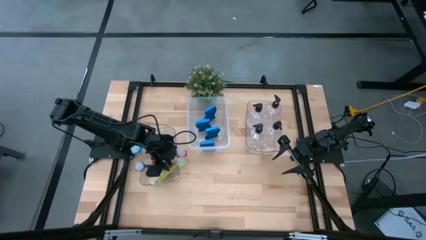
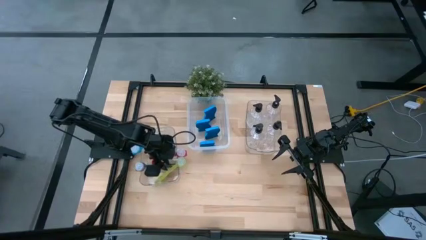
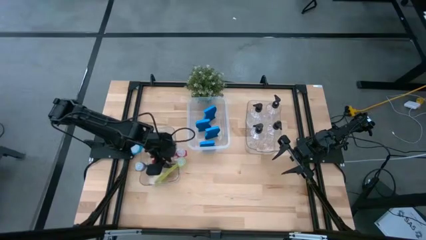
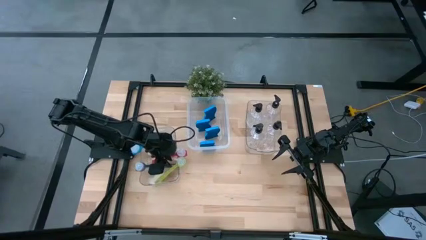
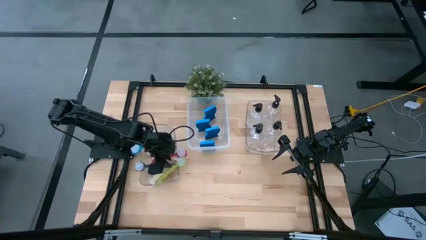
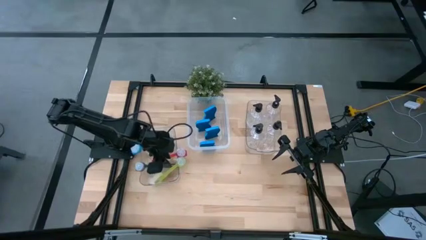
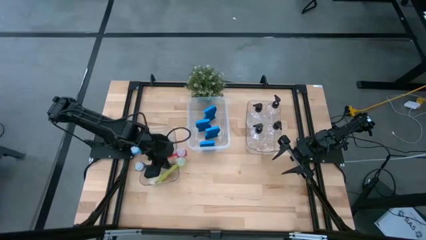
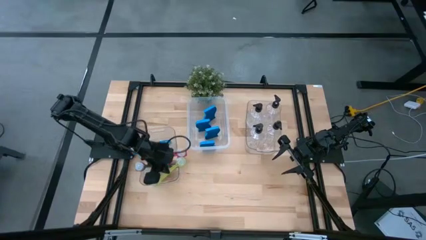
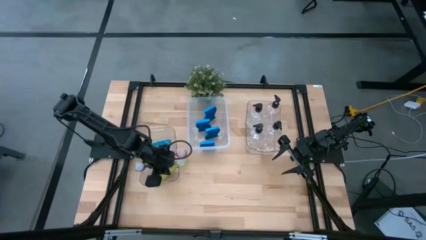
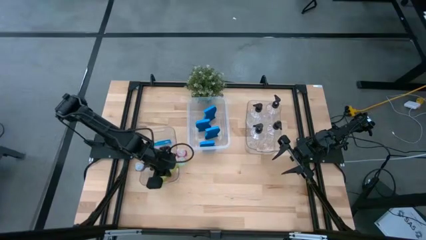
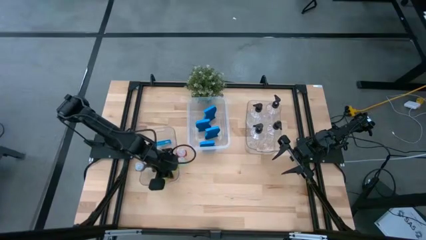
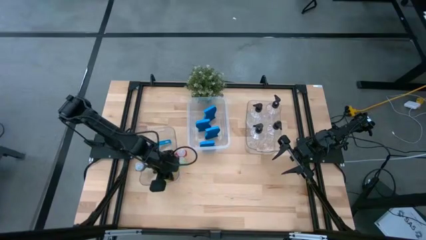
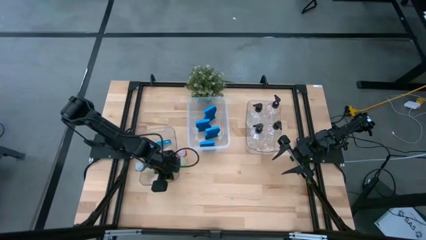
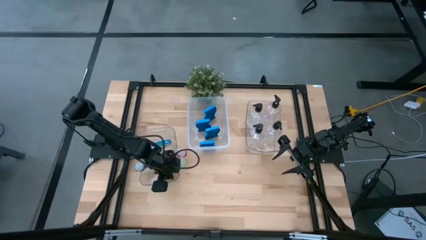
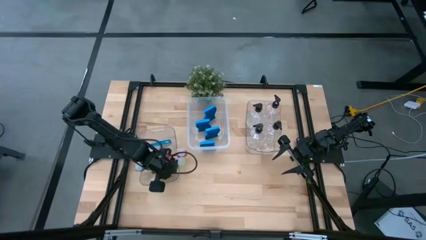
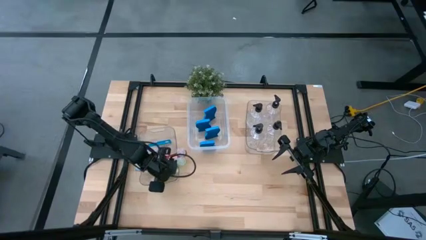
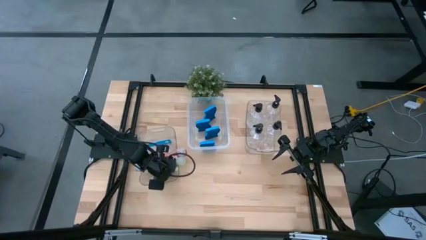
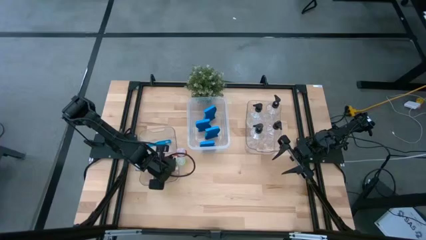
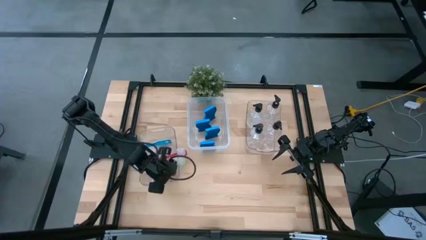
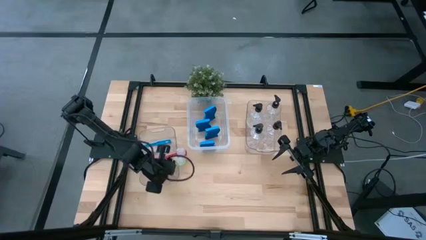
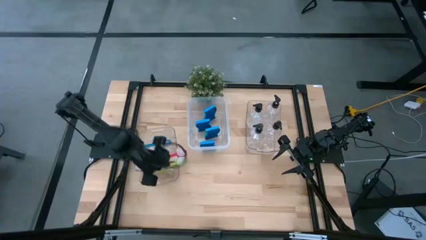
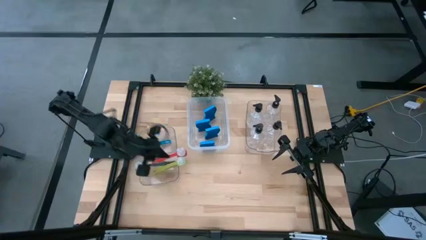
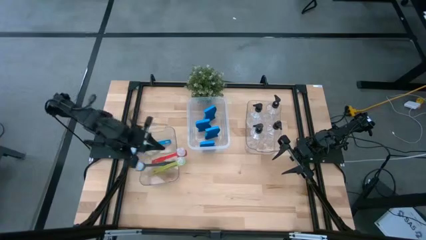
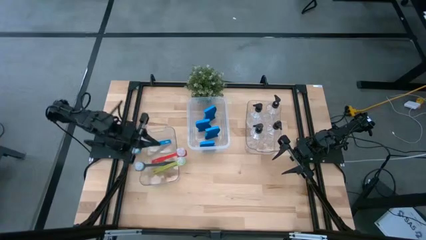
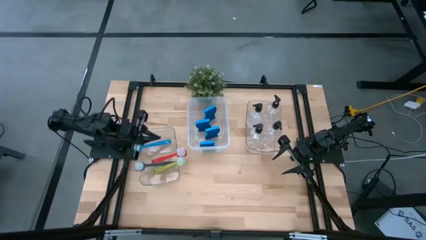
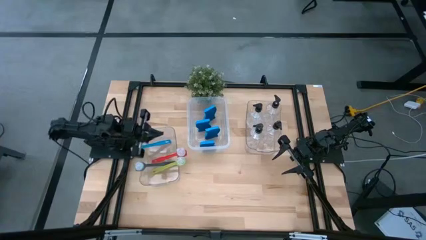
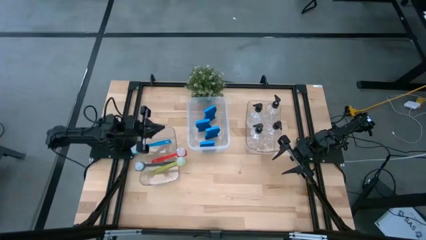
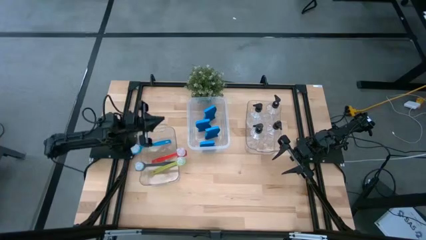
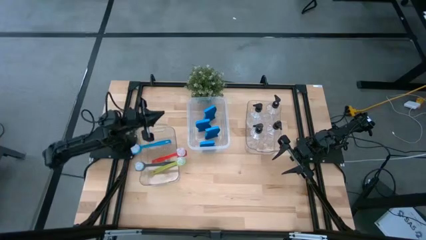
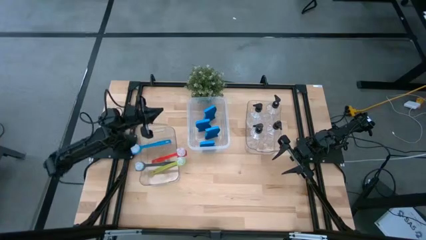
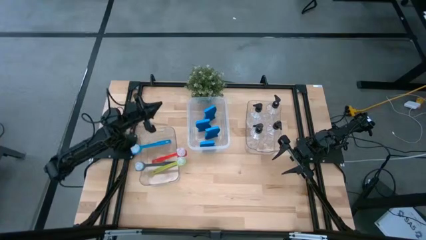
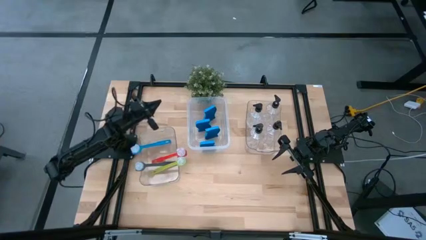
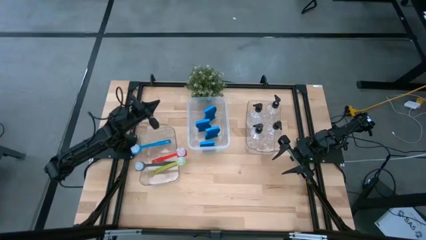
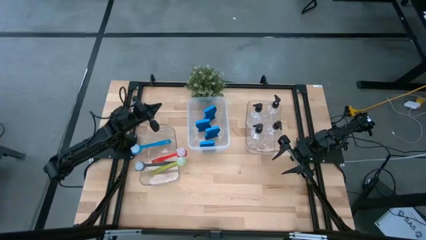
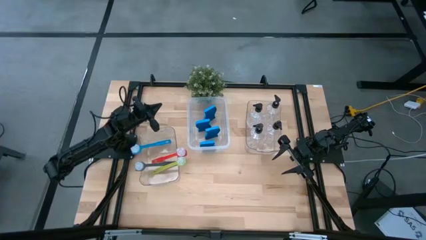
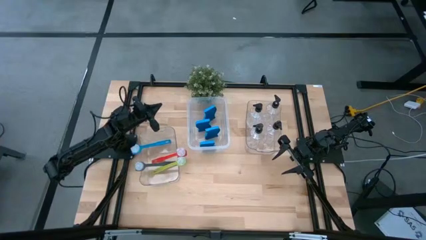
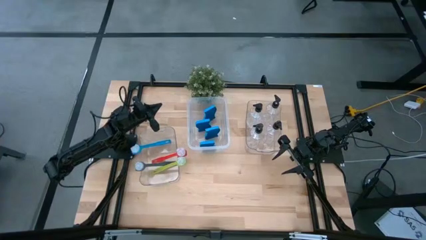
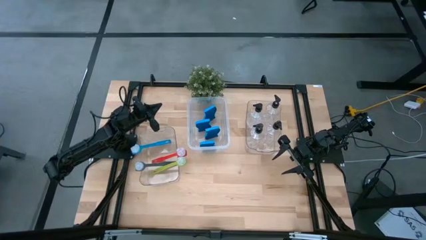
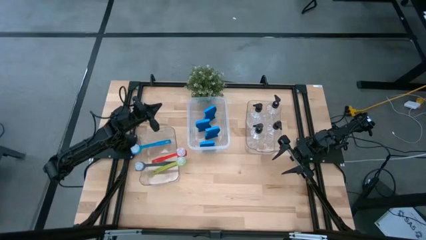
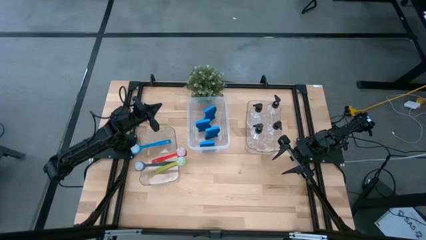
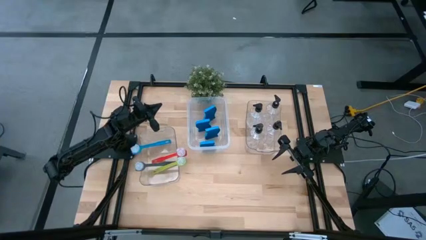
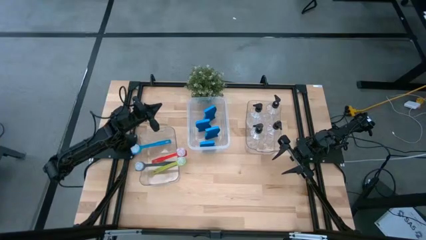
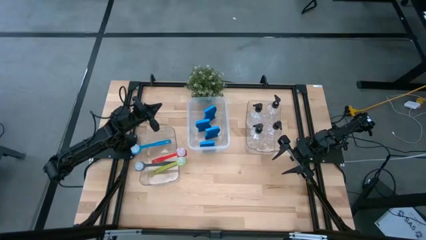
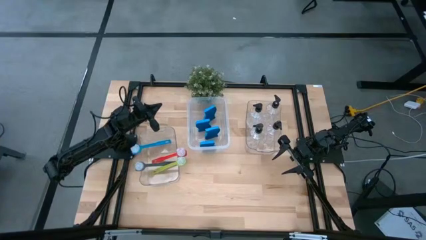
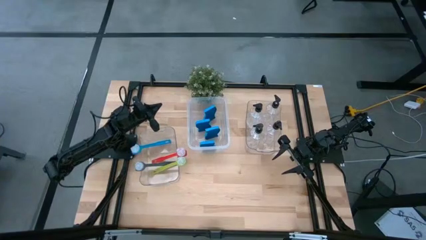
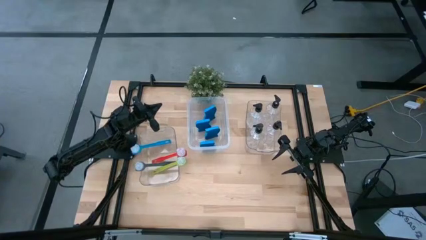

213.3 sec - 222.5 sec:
Task: Pick & Place Kitchen Sink Supplies
Return to Home Position

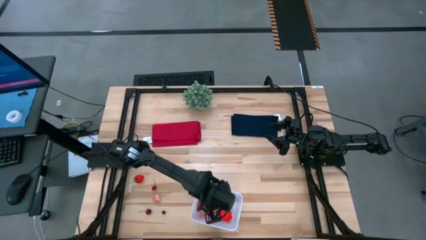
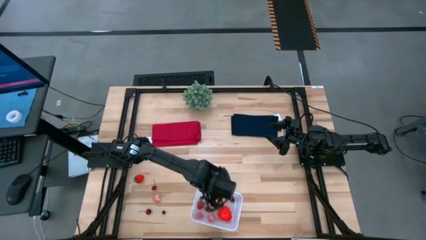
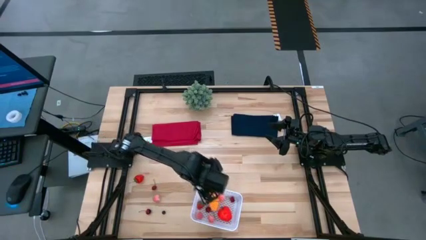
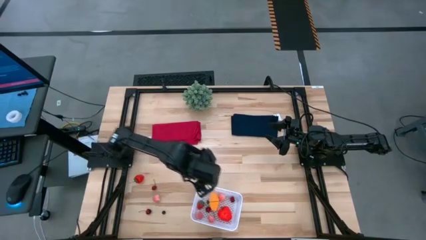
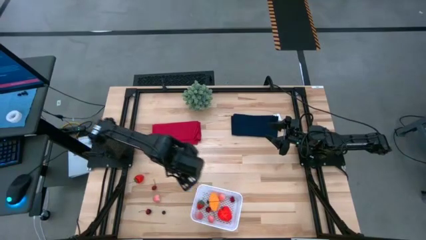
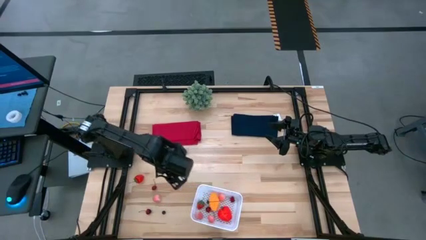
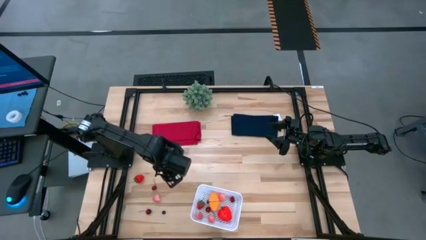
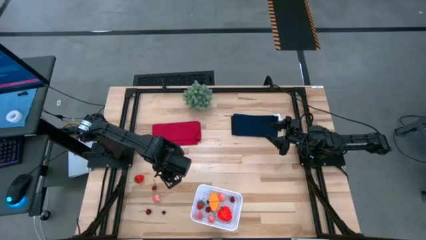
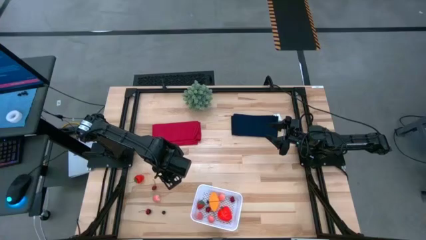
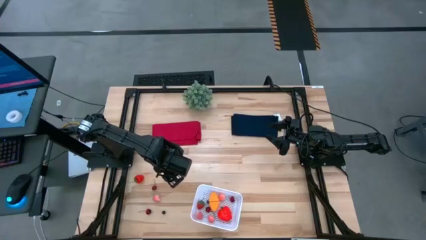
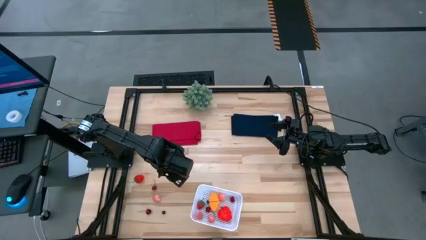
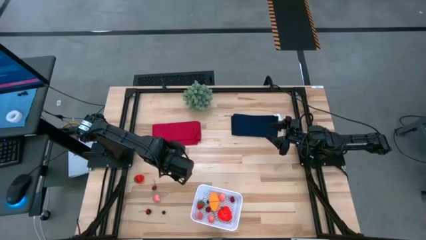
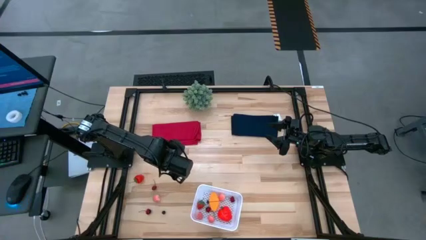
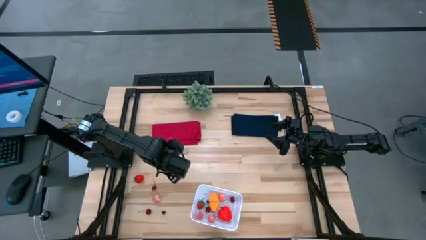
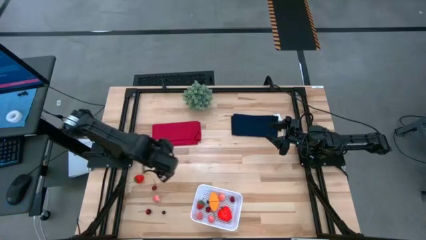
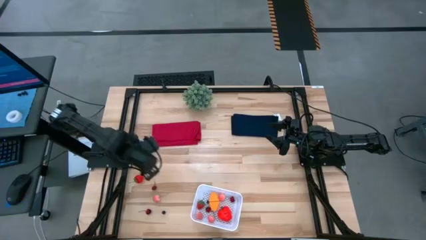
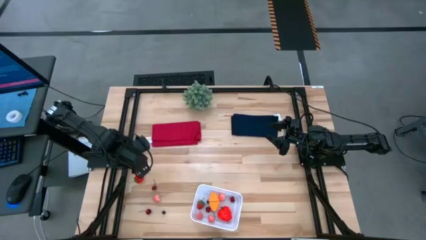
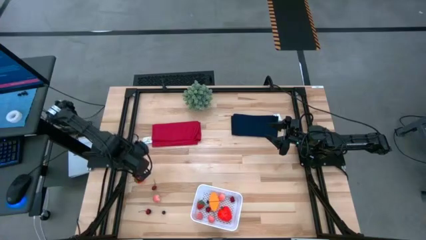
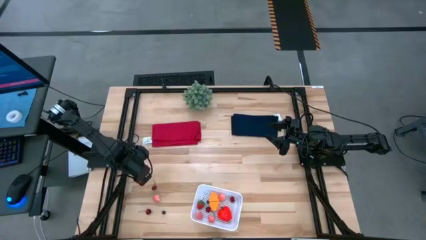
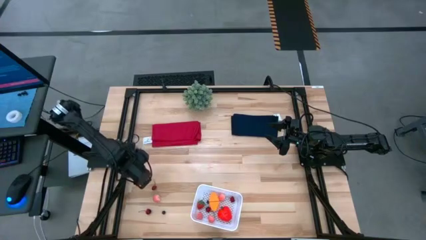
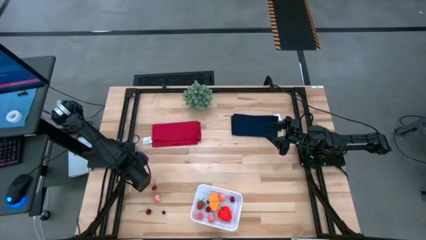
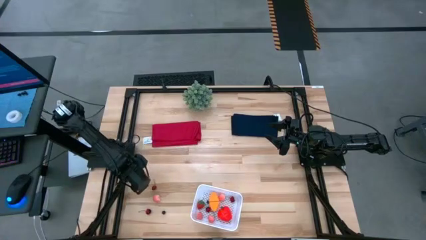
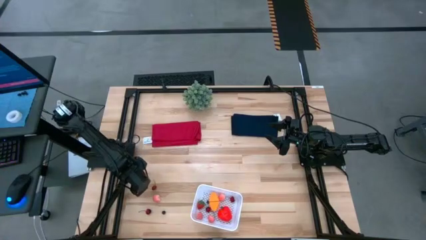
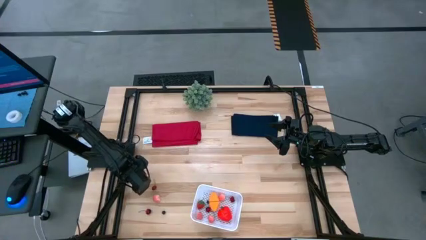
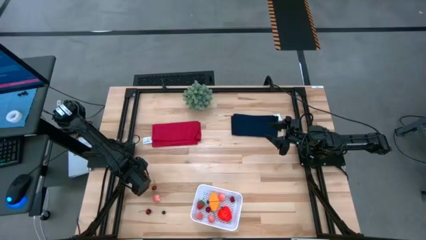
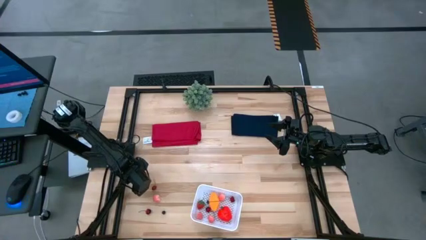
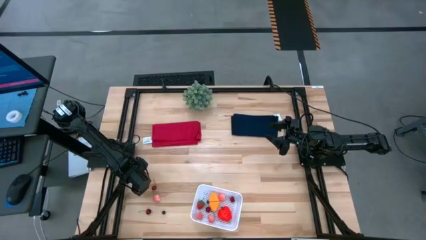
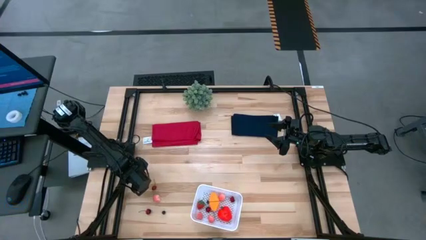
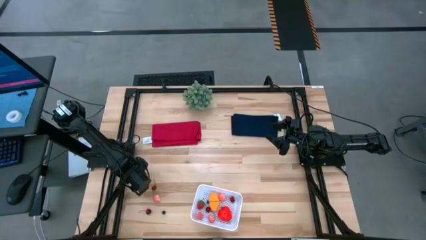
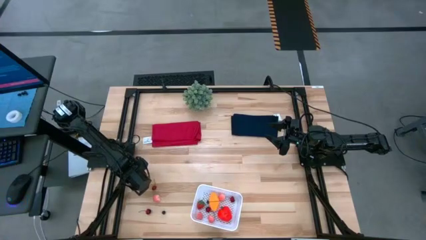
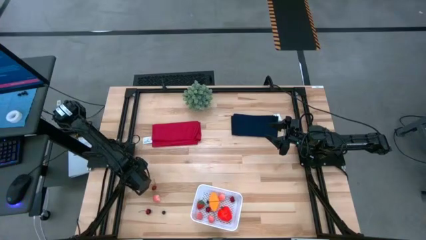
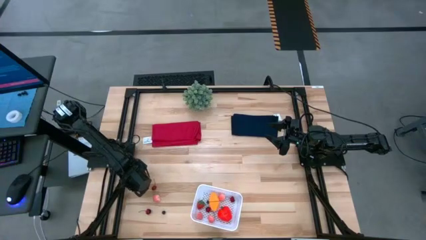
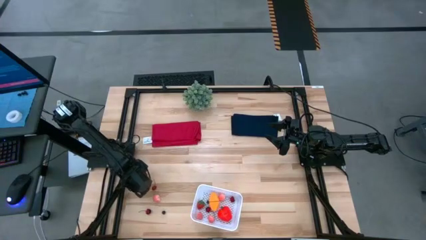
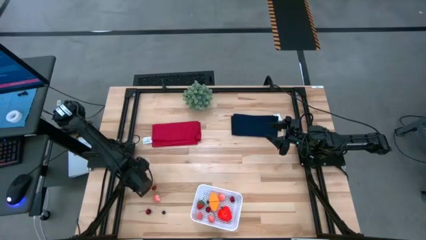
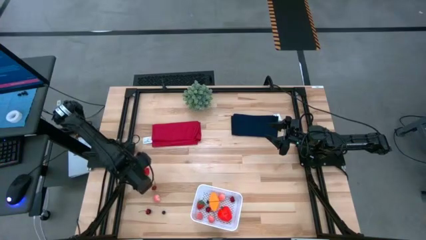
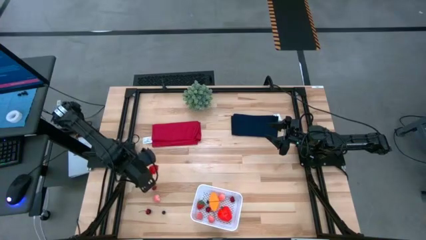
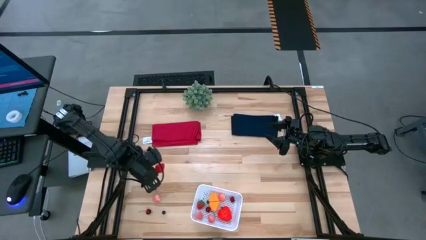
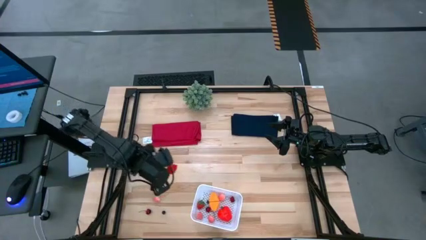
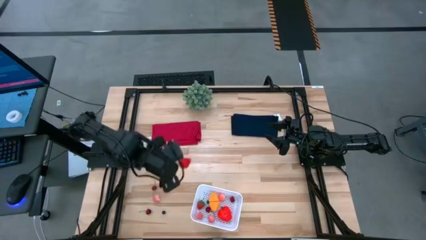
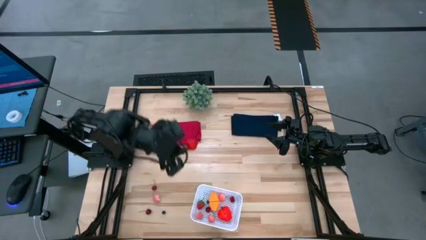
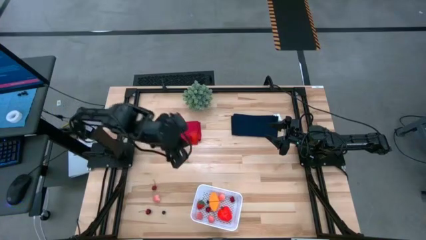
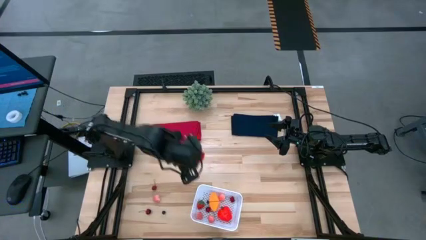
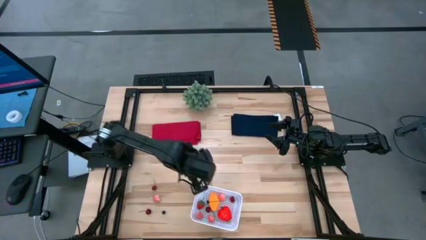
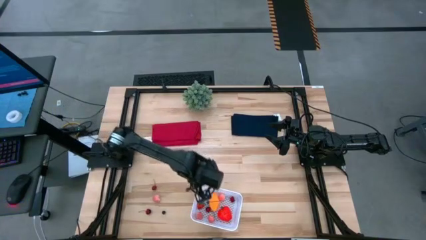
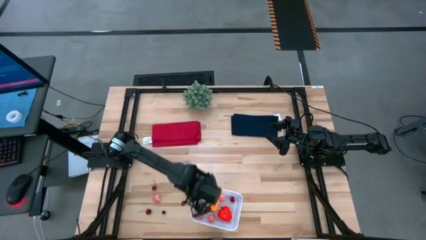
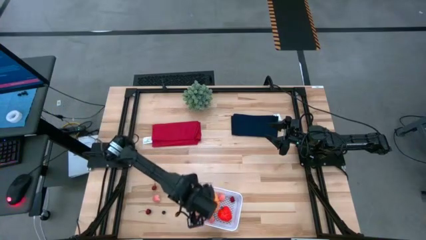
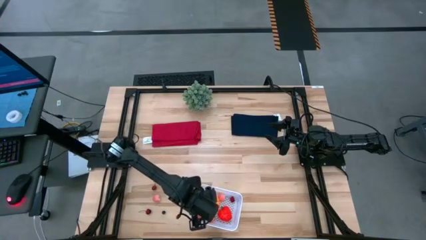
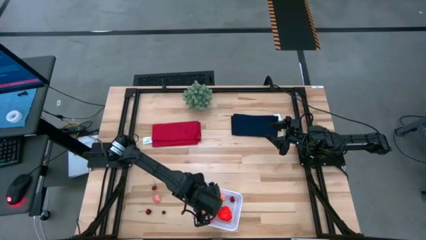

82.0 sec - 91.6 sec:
Task: Pick and placing Produce into tupperware
Put the strawberry into the white bin
